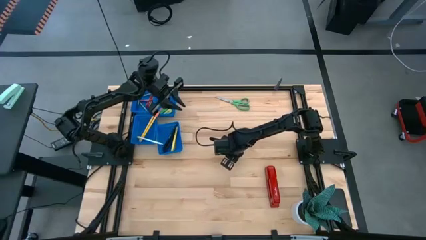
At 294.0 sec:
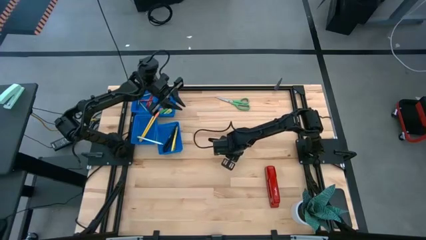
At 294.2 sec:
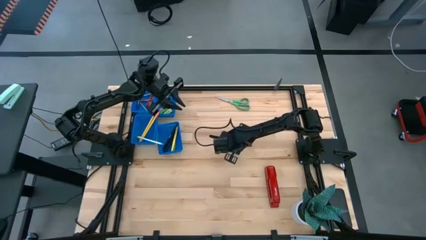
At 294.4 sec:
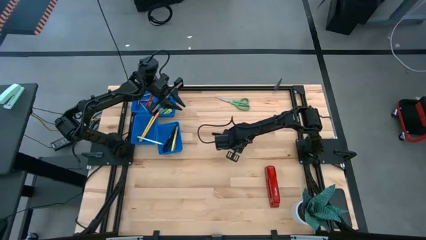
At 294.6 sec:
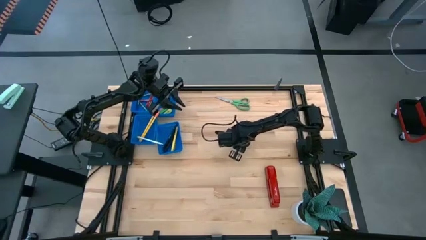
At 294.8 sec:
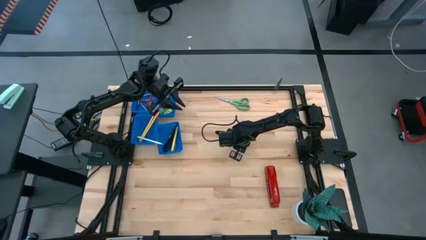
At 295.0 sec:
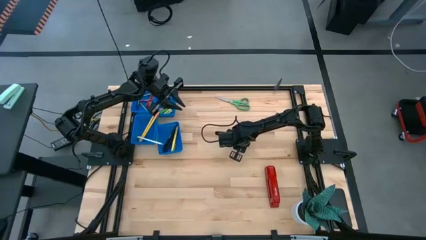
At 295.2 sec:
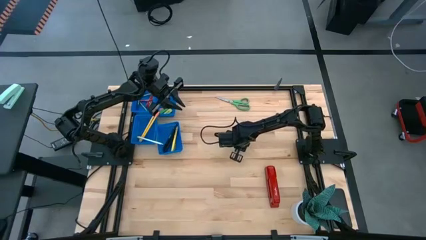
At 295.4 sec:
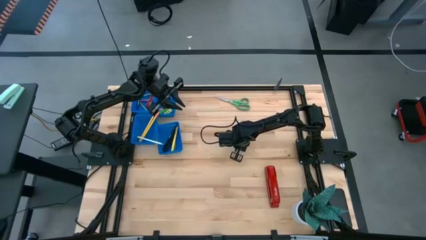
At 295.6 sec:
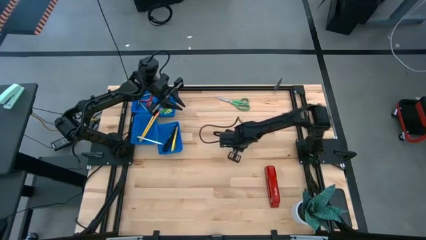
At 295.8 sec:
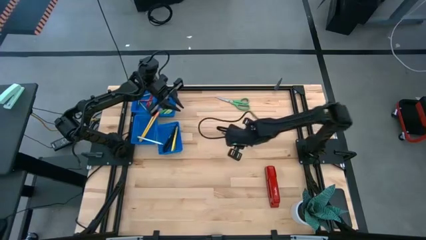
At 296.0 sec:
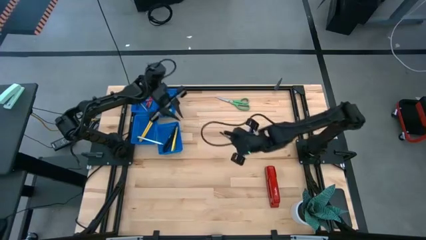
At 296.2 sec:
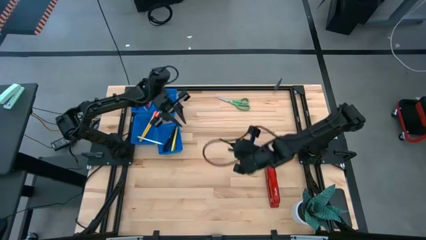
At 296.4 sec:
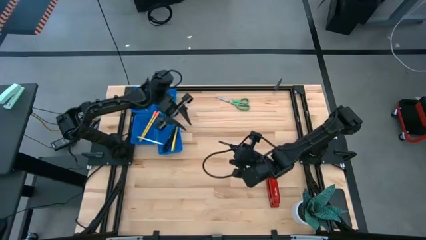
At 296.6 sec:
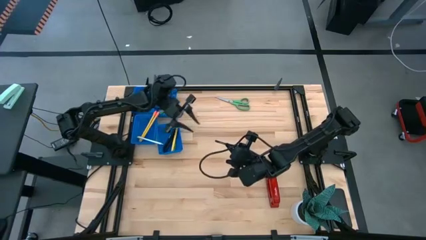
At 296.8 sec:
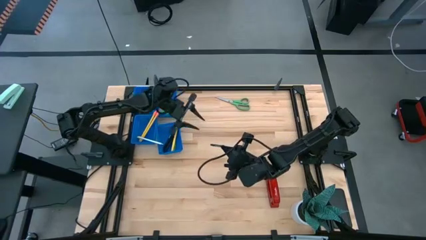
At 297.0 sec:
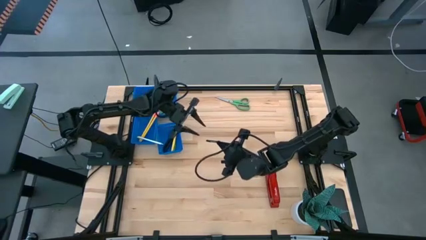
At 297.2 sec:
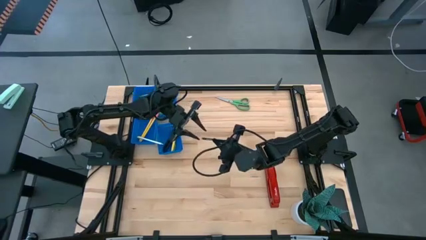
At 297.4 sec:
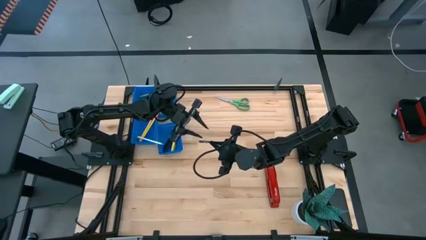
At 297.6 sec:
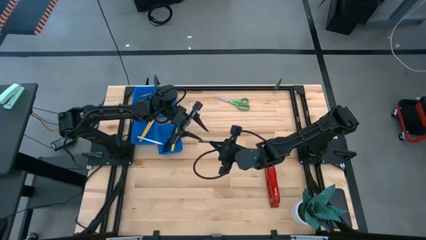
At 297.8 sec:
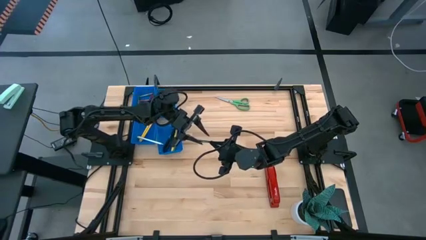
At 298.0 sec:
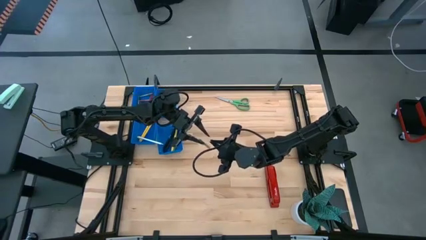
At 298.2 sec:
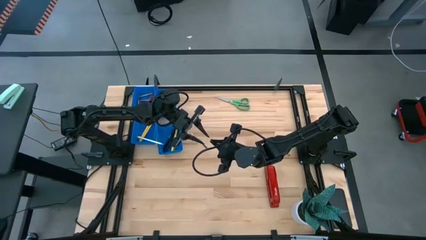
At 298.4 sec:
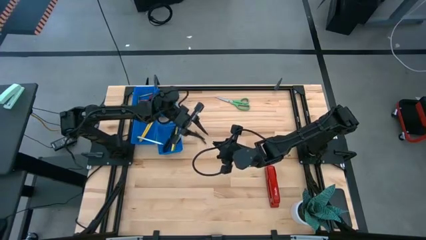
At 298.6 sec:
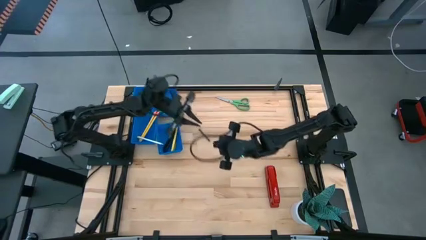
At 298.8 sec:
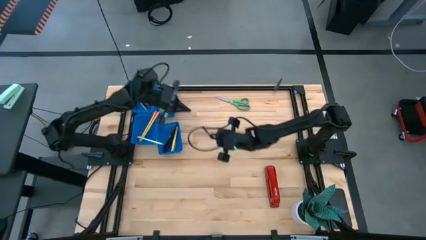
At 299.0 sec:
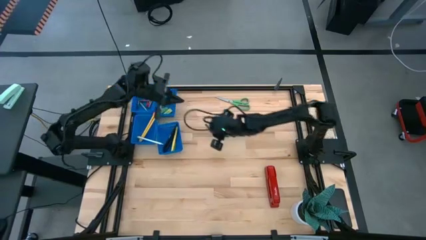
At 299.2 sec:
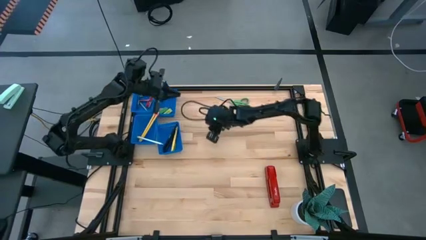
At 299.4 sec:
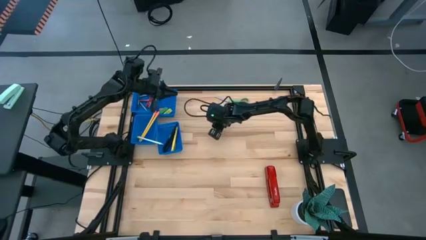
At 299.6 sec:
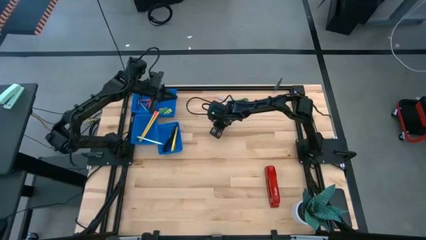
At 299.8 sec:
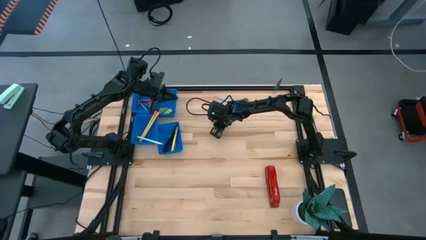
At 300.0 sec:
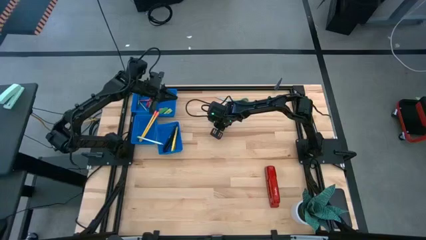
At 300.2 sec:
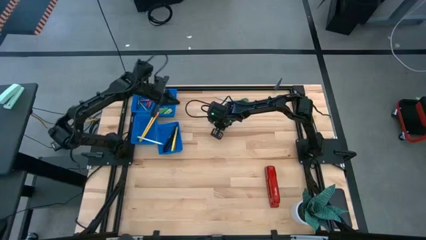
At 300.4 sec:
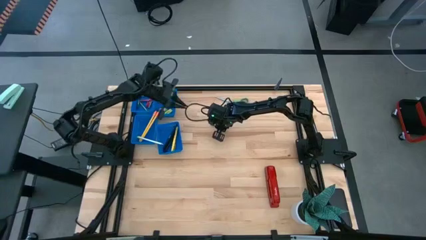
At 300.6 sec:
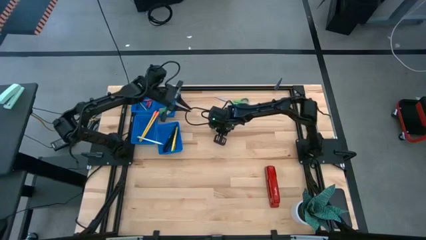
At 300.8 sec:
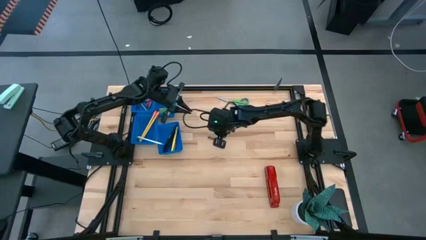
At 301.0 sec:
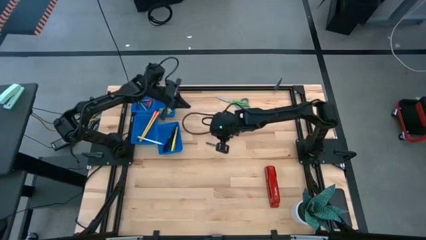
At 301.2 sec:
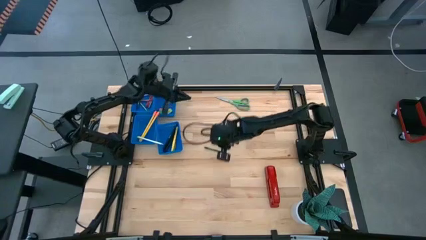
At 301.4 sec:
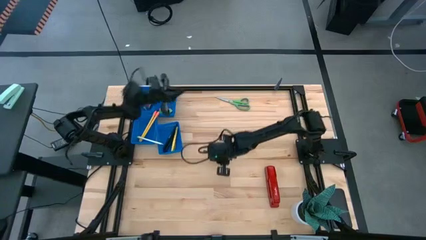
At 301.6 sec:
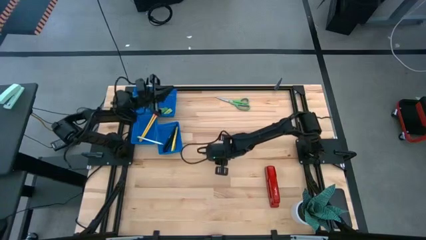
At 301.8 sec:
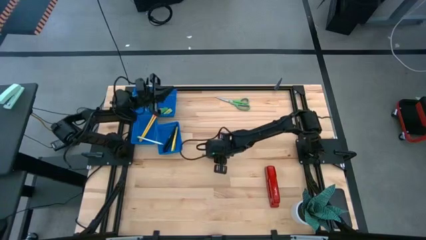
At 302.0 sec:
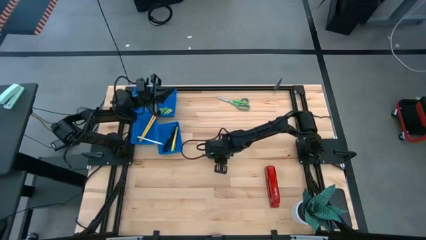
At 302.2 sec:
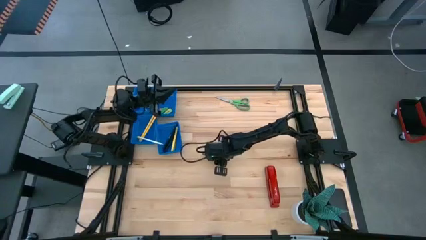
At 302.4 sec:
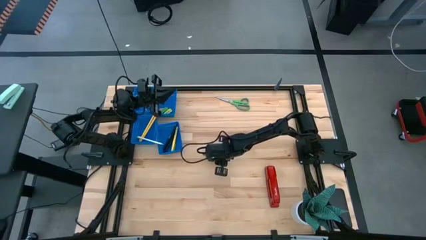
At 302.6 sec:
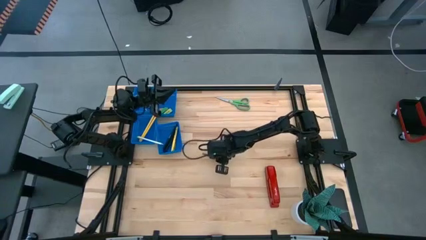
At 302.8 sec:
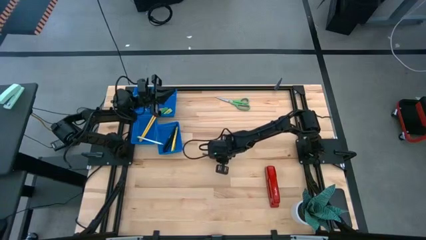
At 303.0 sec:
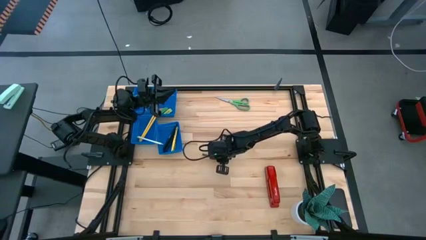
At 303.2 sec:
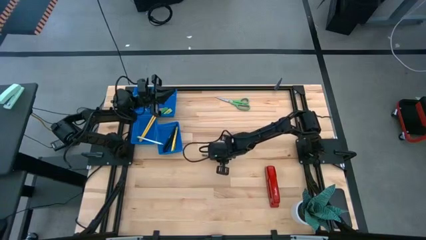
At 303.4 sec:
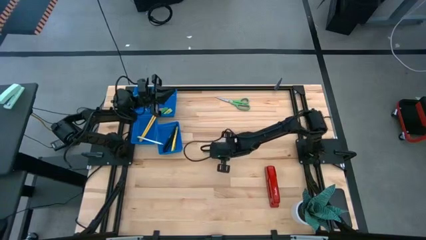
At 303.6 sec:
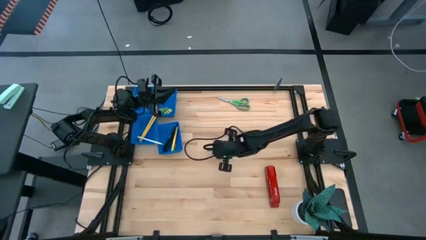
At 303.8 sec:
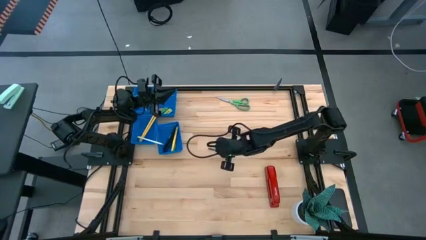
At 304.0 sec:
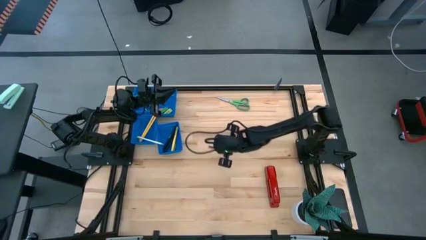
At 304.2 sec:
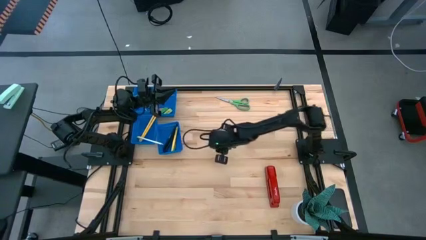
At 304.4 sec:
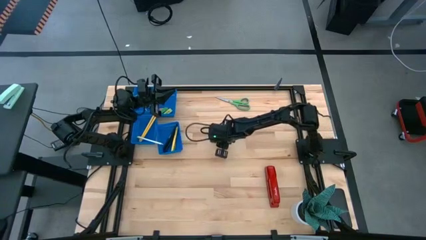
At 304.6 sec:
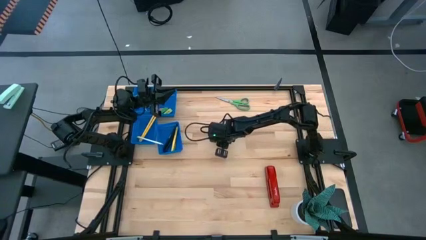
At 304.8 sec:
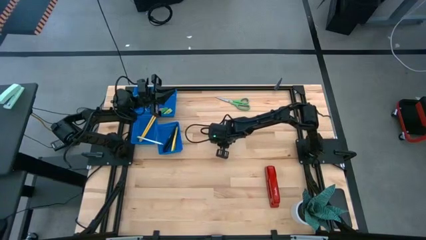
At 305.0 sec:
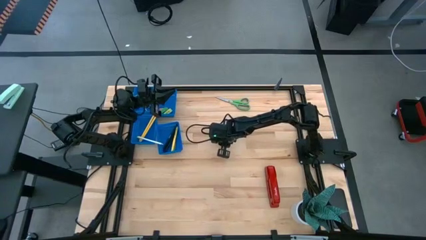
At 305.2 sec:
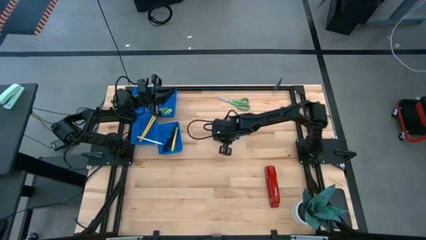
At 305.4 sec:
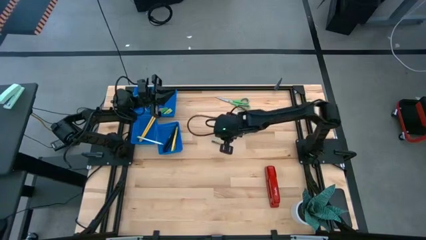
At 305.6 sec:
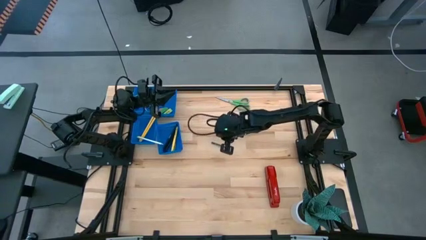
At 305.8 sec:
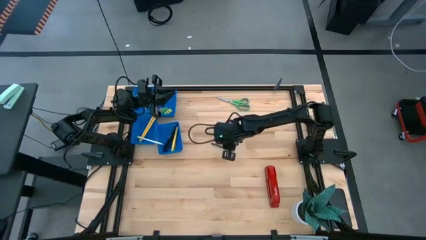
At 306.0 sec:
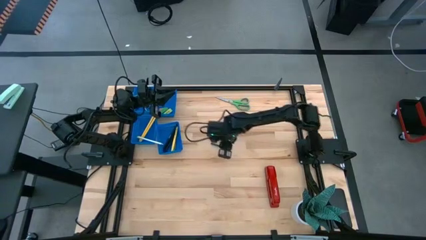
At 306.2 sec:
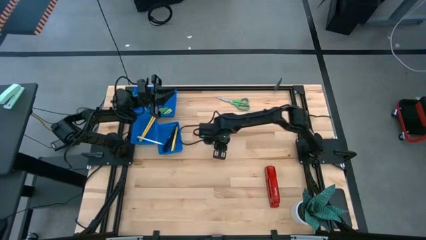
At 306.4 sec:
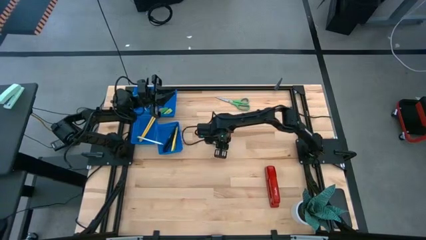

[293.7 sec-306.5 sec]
Task: Sort crayons/erasers/pens/pencils in bins
Put the green crayon into the top left blue bin

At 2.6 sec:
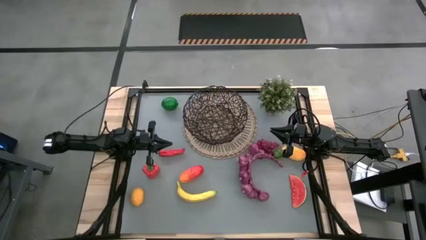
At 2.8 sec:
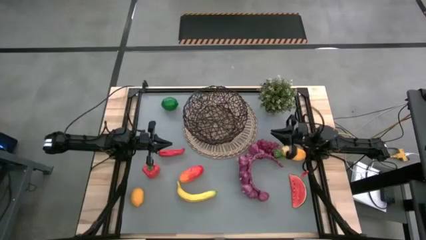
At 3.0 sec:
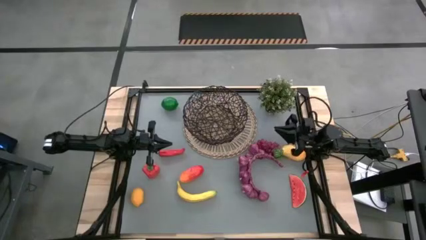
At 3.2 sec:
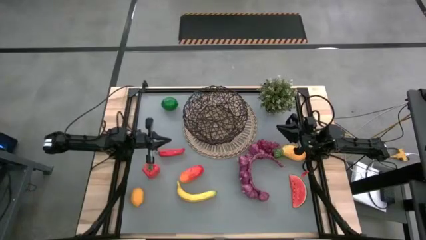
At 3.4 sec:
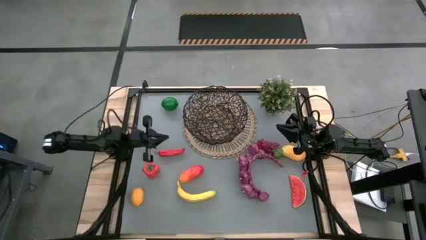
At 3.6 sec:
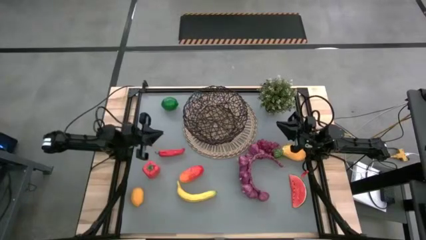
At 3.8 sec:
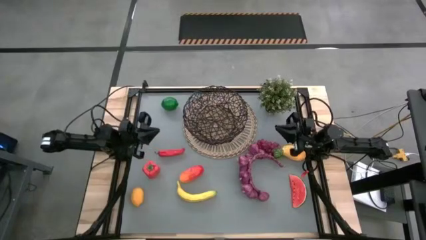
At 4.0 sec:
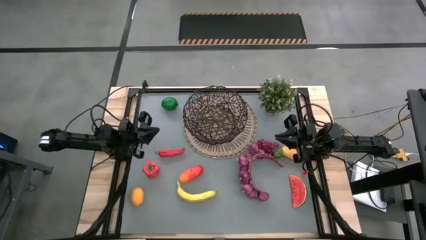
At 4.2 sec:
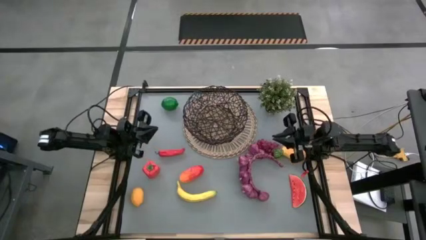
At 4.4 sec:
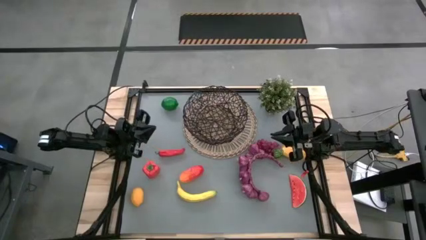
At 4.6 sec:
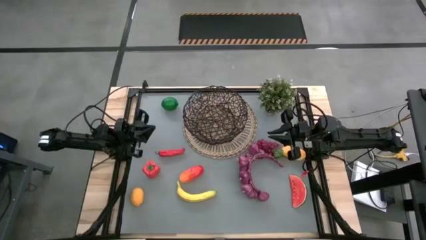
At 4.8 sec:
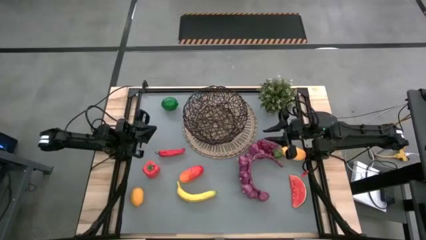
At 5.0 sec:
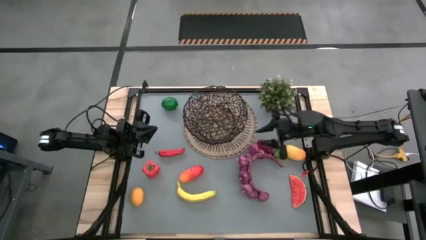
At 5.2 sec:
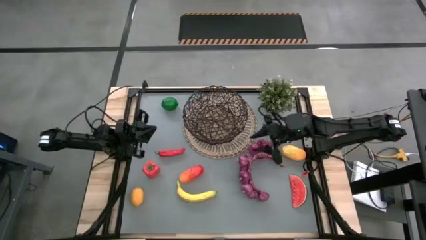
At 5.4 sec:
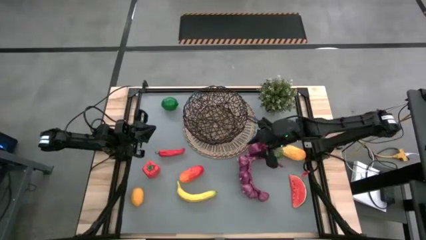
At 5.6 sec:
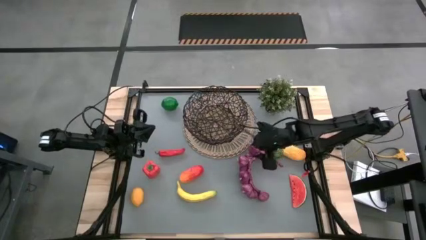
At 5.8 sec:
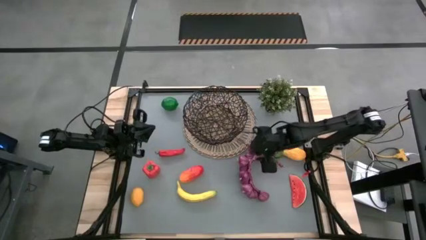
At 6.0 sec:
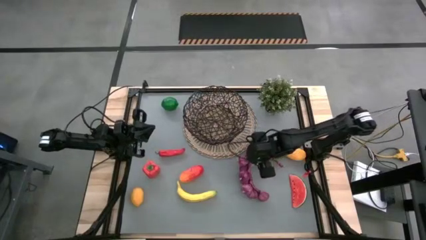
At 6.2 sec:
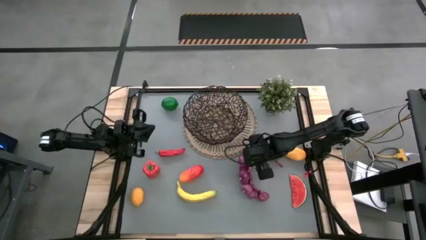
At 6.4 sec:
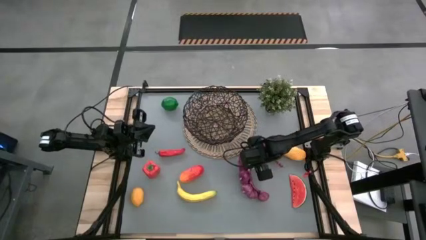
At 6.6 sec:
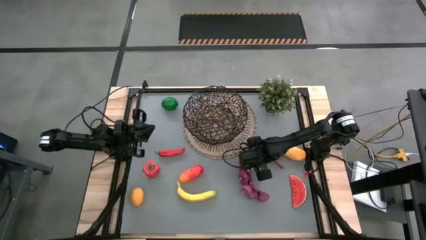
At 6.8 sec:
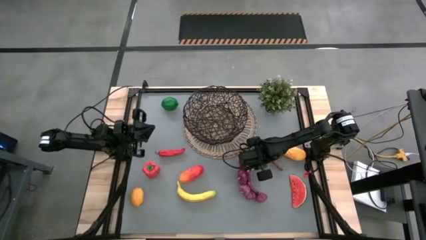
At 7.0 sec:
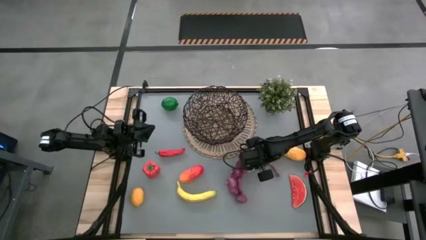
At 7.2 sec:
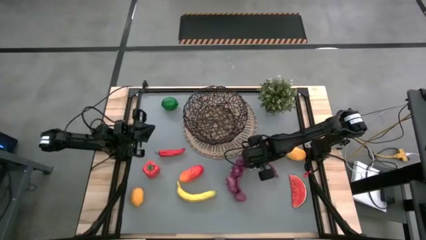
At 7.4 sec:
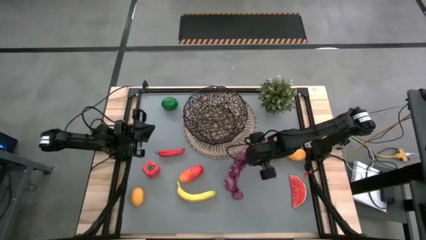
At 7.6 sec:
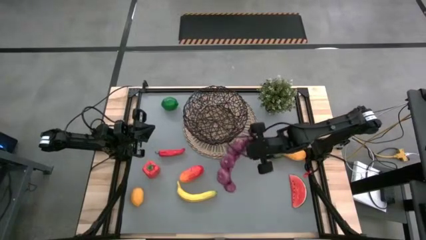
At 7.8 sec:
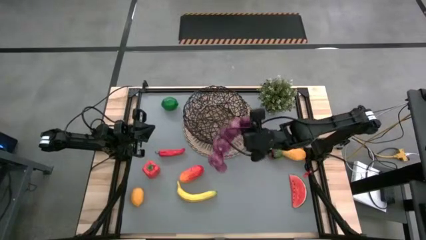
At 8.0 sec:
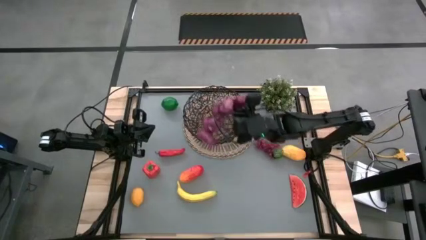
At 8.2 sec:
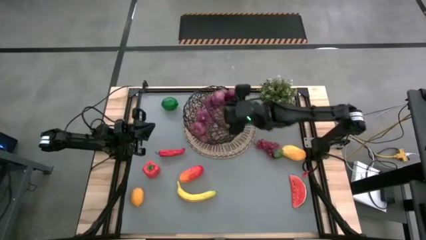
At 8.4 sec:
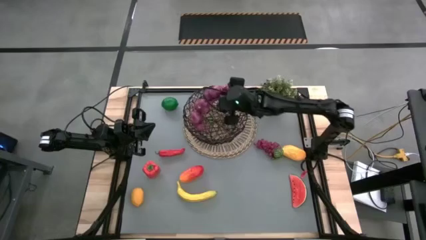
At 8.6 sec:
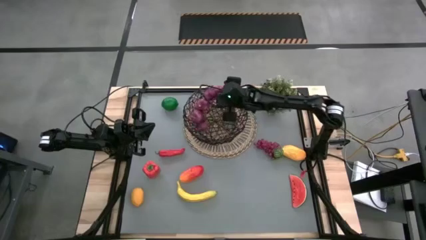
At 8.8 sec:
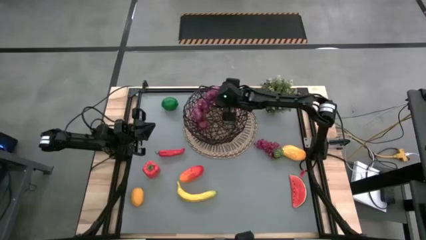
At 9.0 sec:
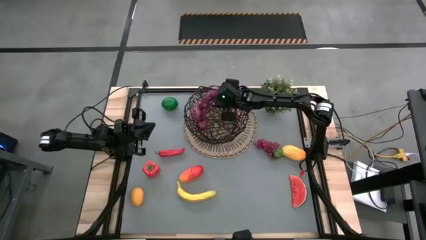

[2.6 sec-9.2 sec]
Task: Build produce basket
Put the purple garlic into the basket
